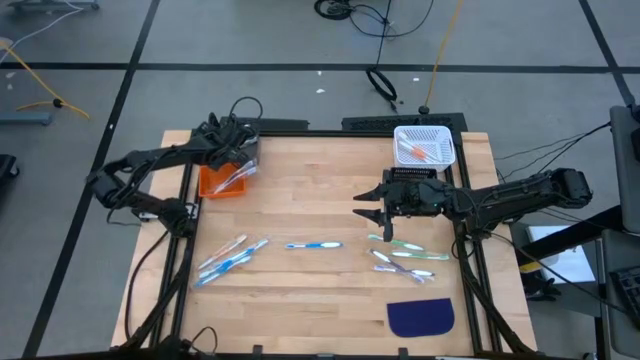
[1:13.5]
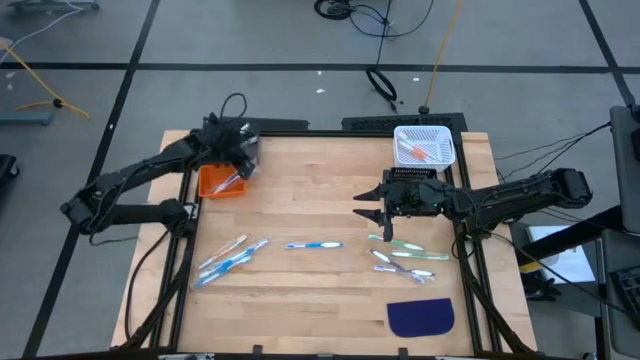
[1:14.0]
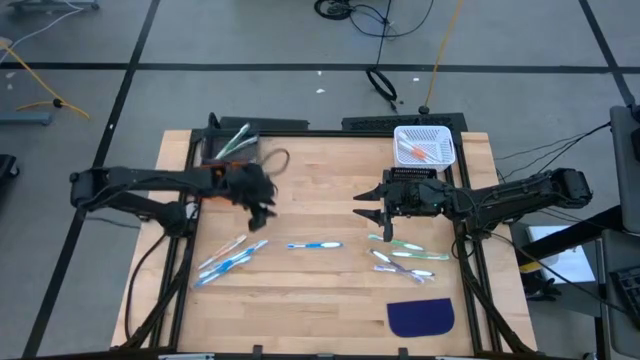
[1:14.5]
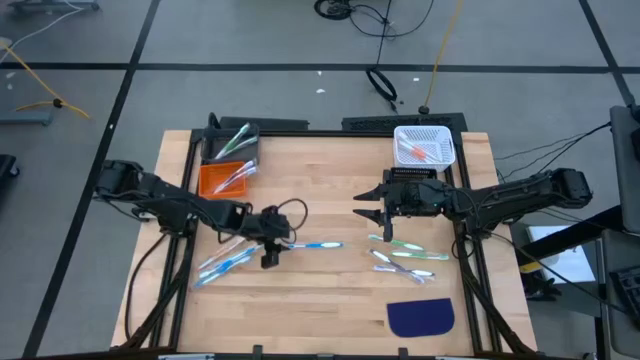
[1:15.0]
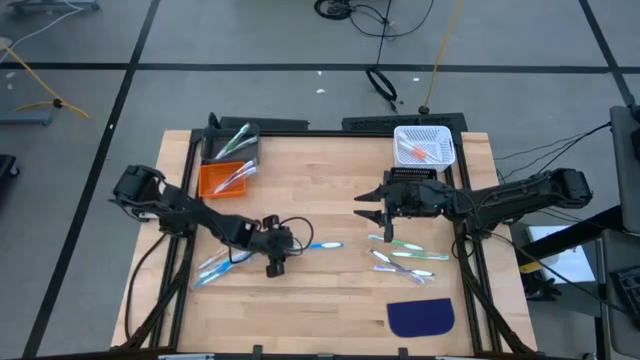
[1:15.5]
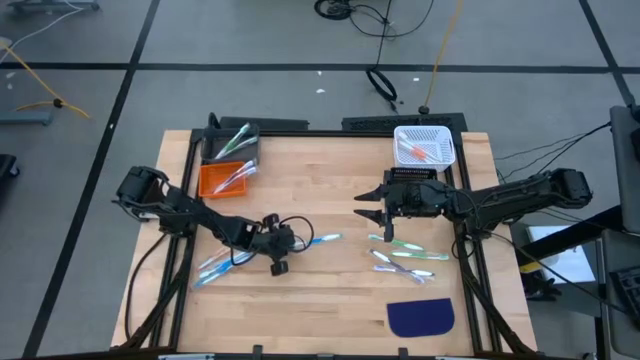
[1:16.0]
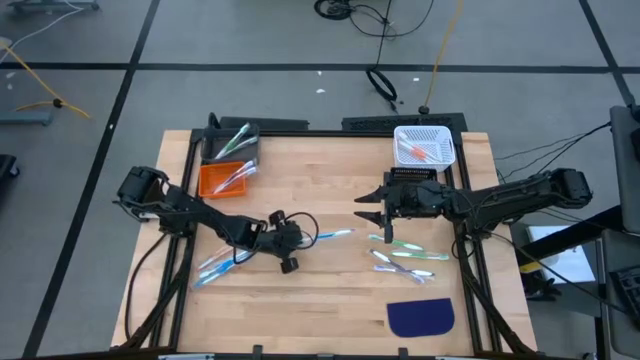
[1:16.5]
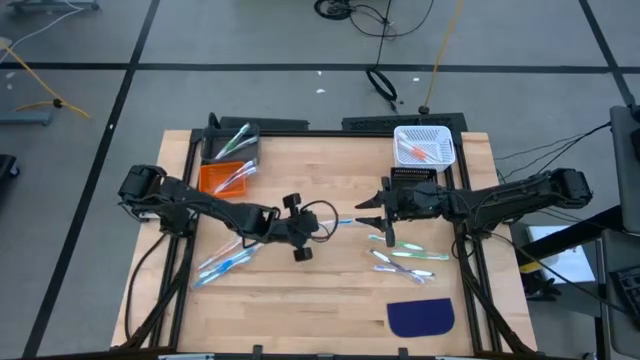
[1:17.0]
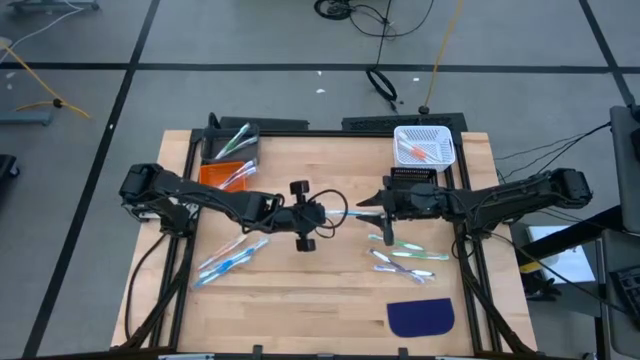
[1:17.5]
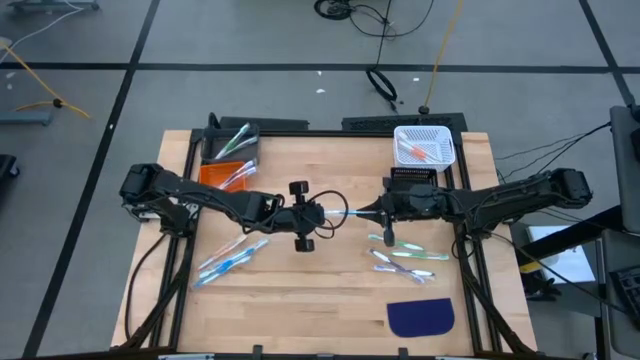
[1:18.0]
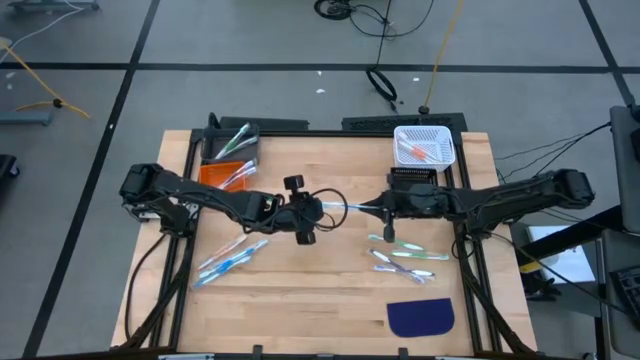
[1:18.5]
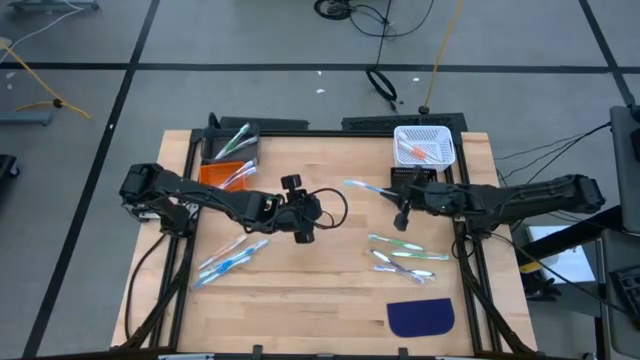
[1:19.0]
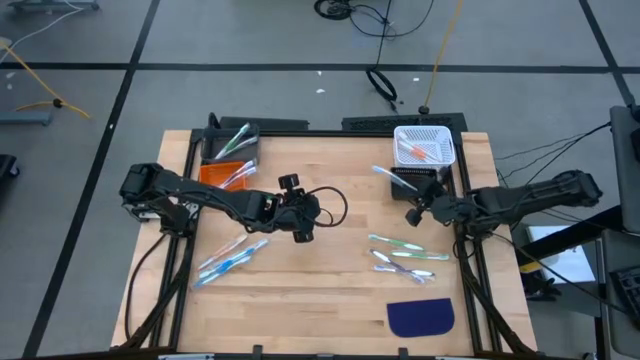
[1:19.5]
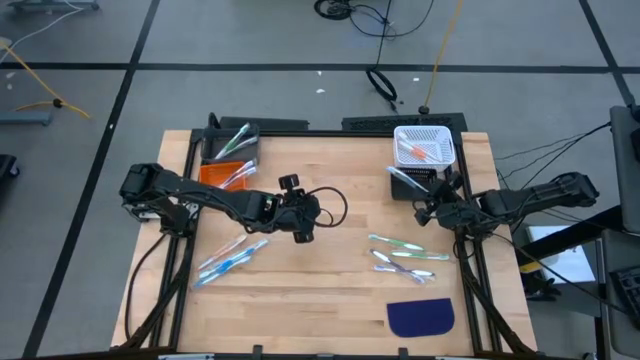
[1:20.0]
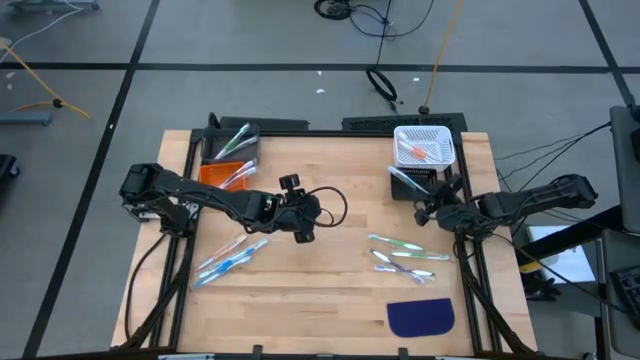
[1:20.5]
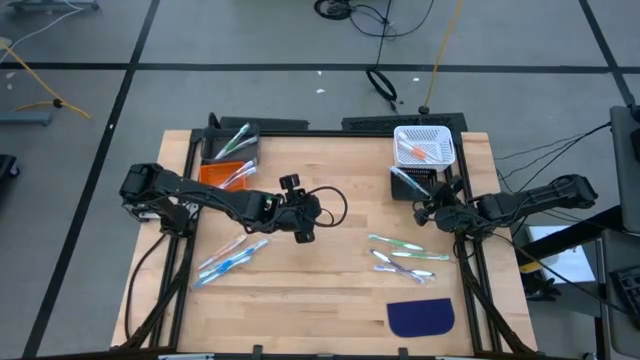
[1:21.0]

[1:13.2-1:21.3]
Task: Pick & Place Toothbrushes
Put the blue toothbrush into the black bin

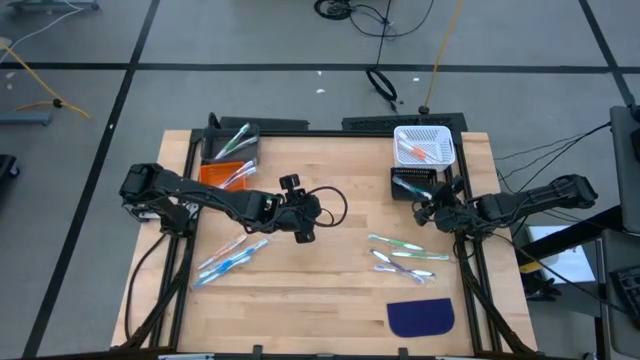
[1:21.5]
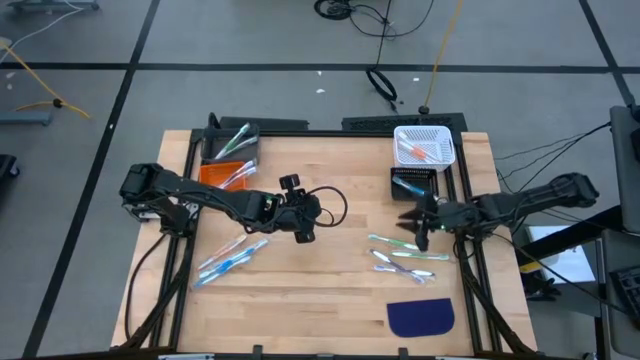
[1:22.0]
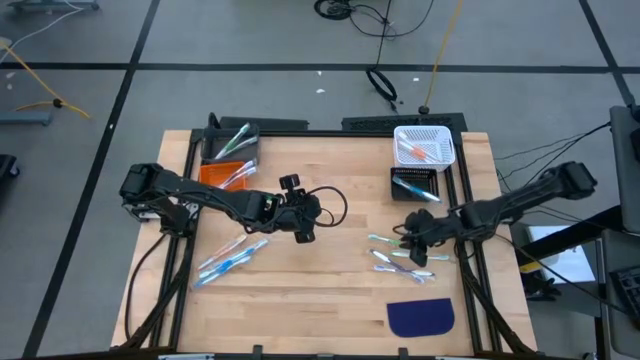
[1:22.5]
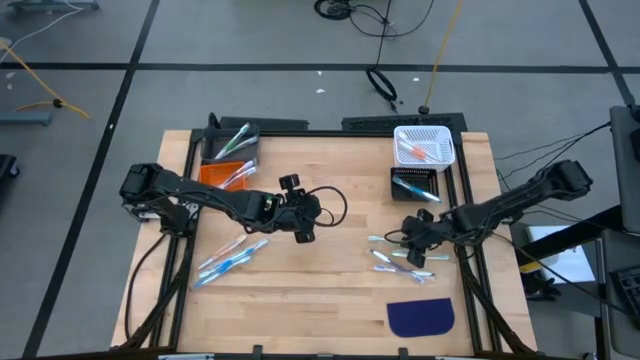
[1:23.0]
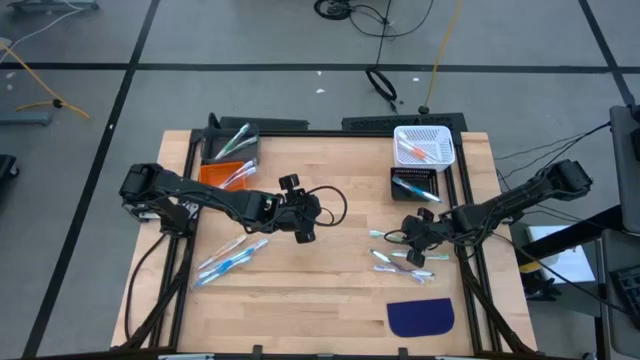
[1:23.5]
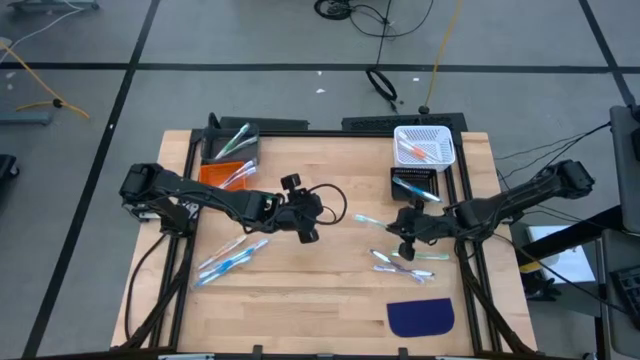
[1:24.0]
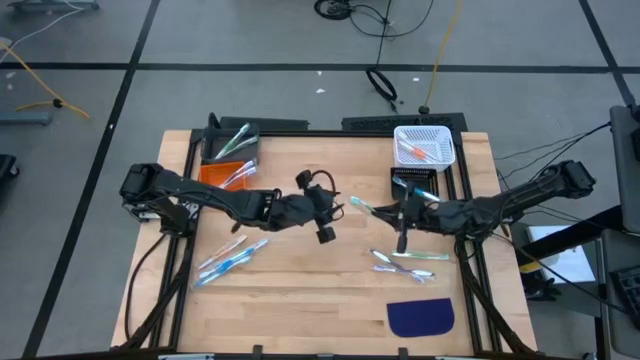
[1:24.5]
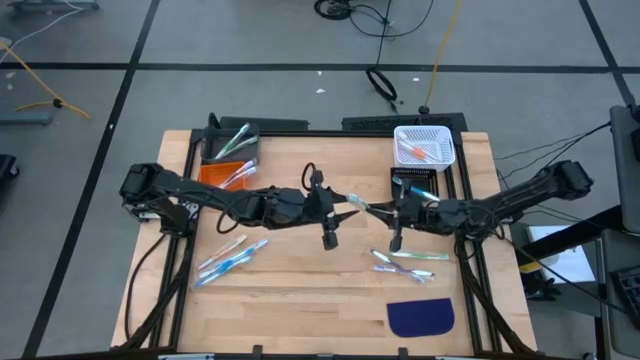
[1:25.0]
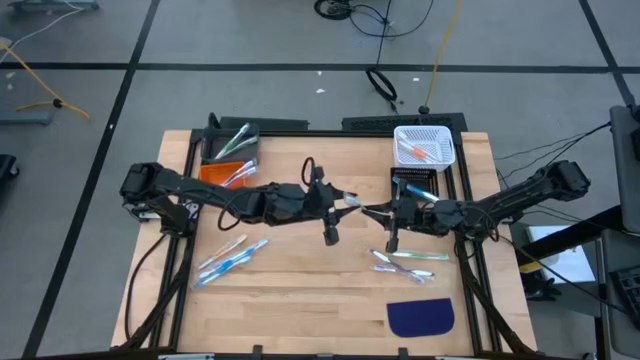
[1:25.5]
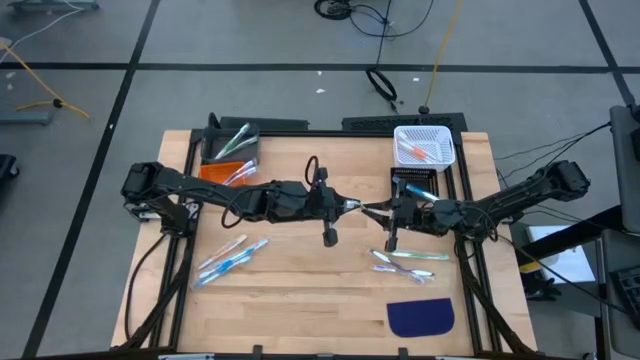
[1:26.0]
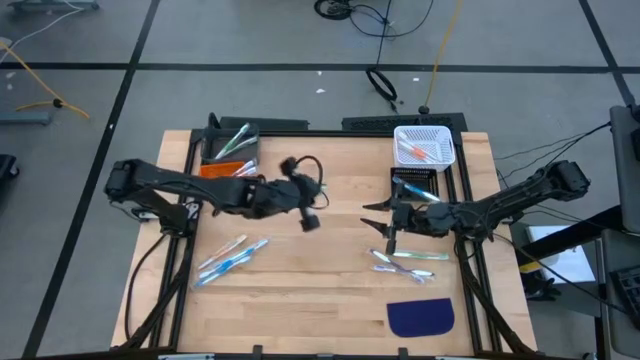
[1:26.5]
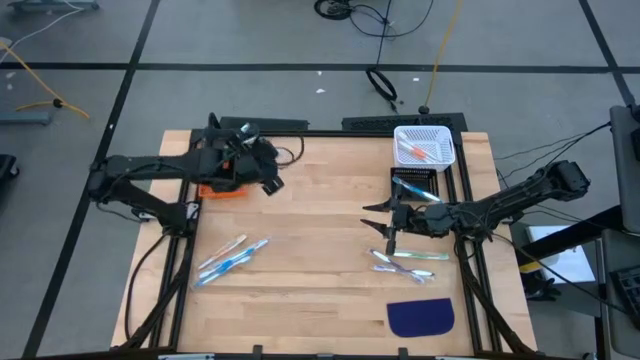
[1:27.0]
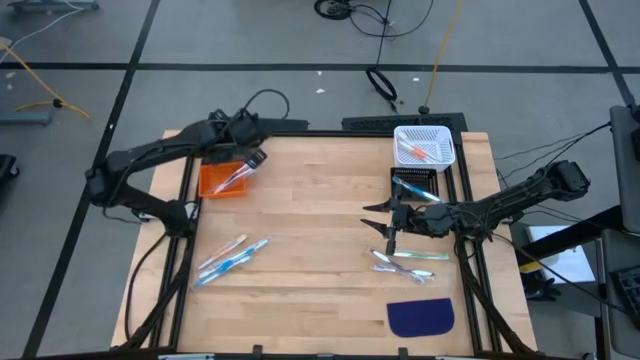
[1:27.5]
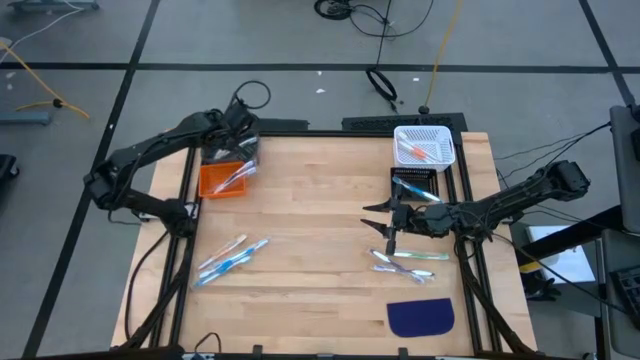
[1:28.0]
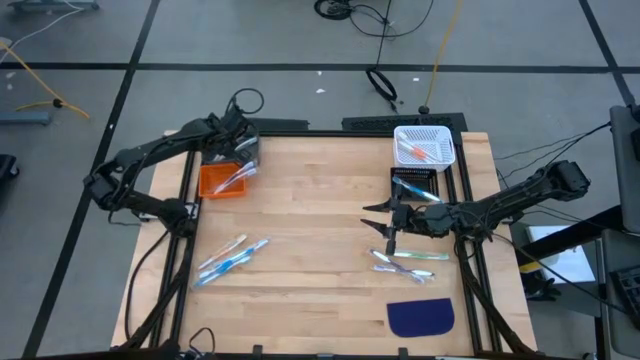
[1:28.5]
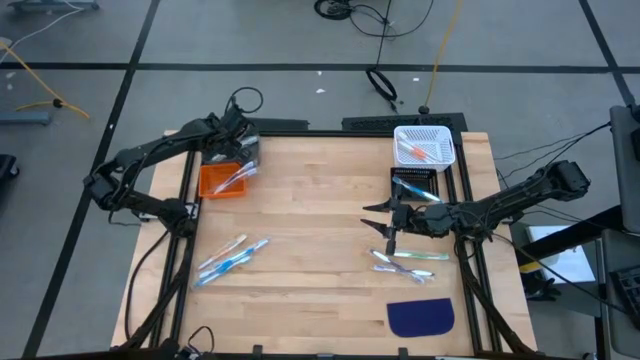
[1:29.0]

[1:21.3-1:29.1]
Put the green toothbrush into the gray bin

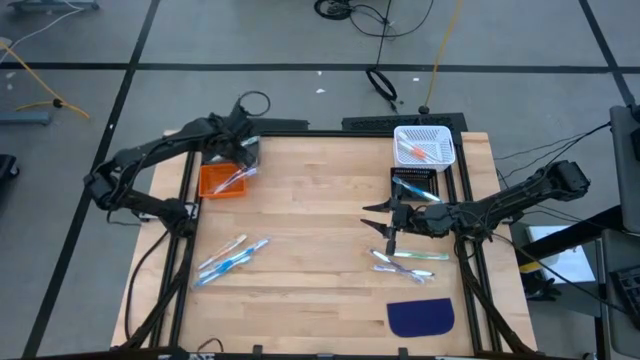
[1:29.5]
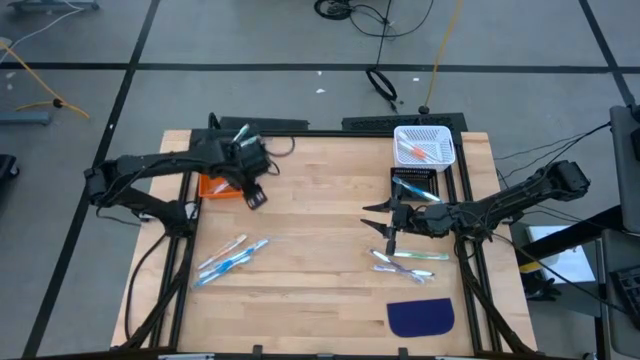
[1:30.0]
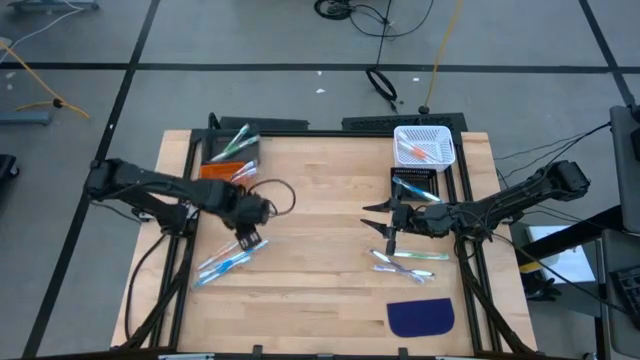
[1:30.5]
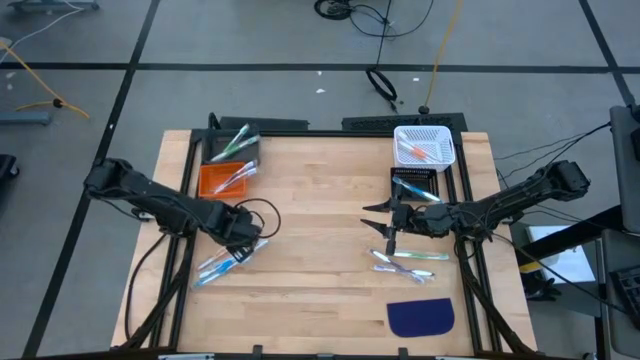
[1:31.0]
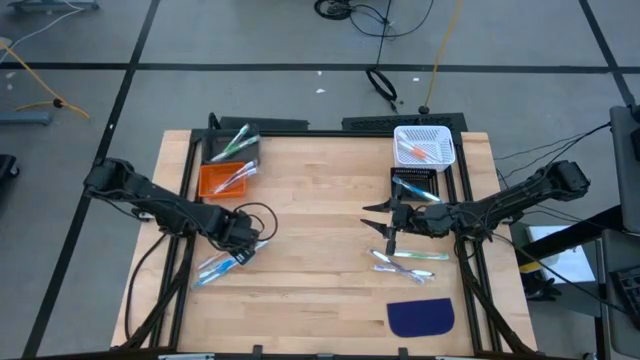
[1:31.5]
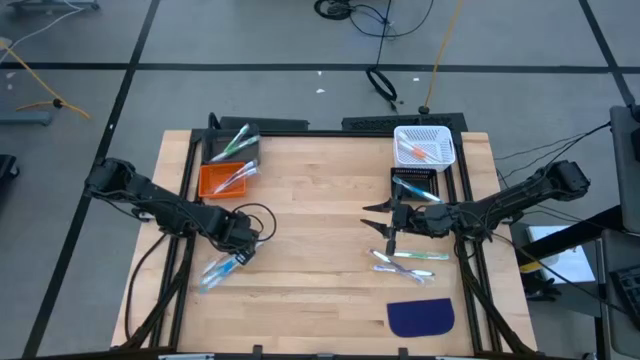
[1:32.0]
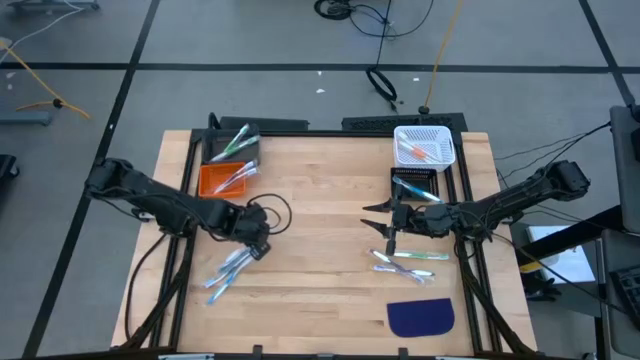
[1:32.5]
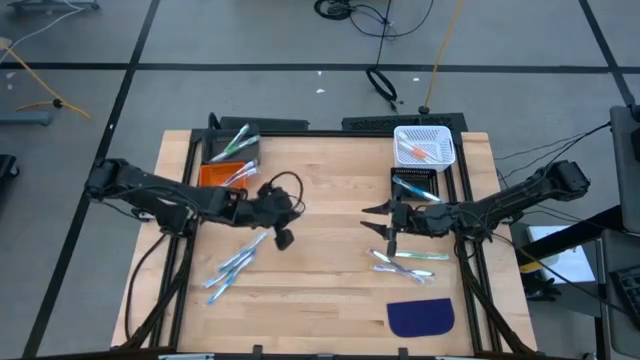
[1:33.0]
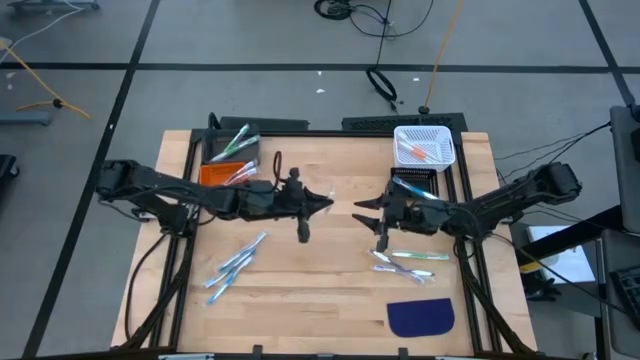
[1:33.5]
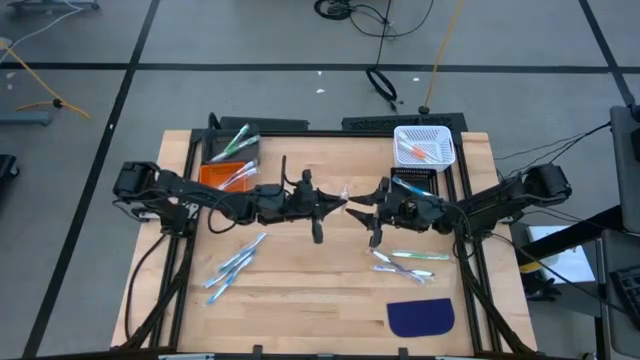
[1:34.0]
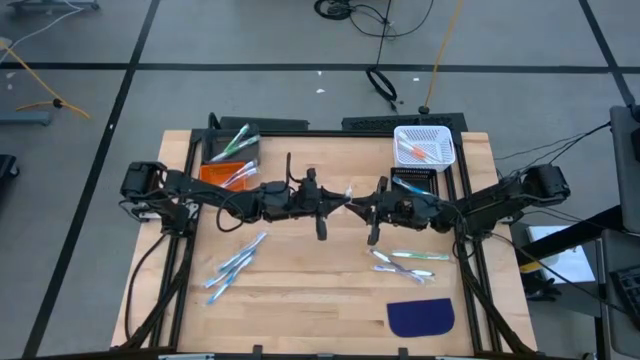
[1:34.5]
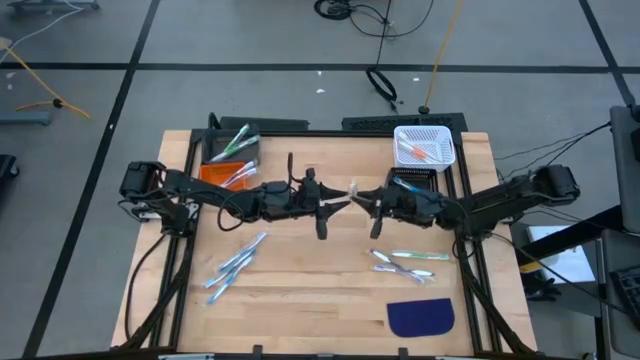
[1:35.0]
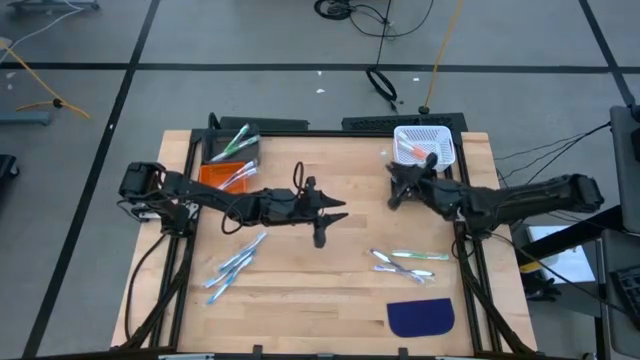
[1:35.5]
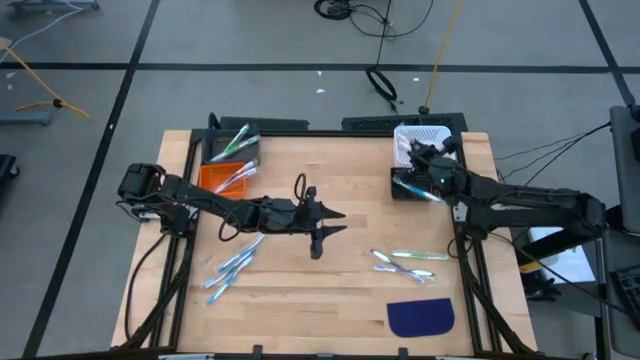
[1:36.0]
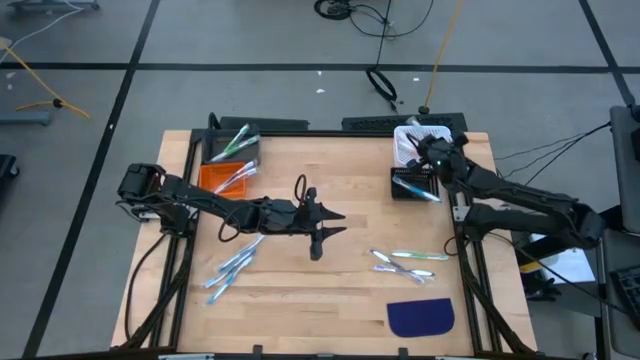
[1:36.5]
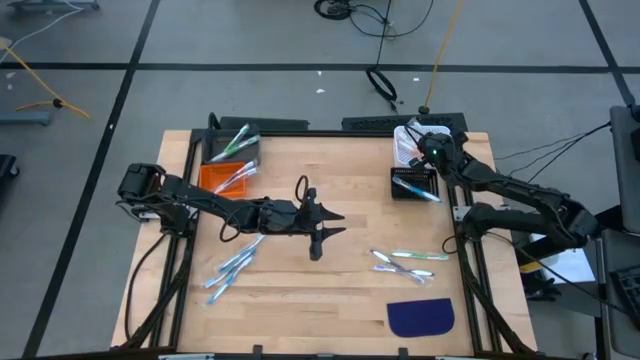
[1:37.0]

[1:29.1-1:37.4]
Put the orange toothbrush into the white bin
